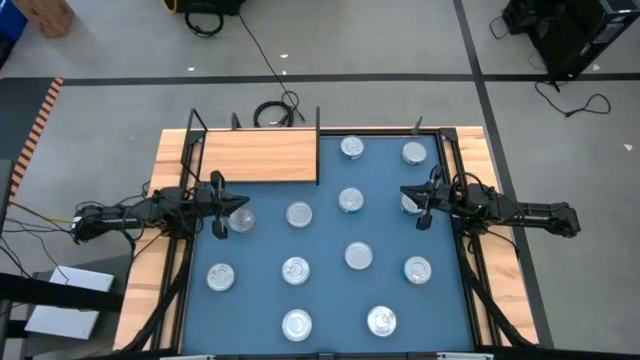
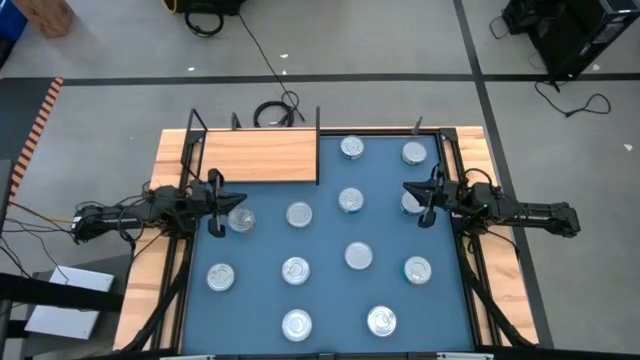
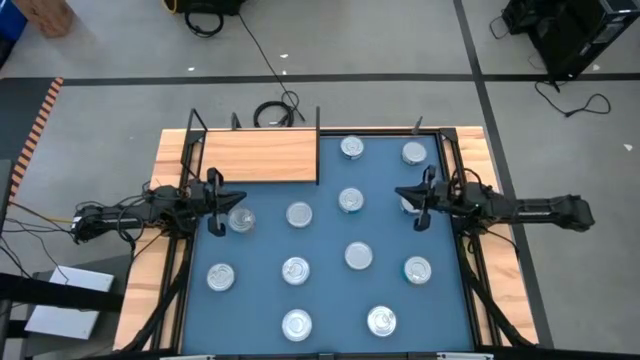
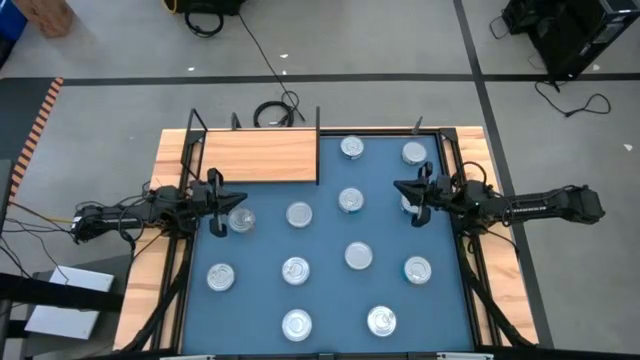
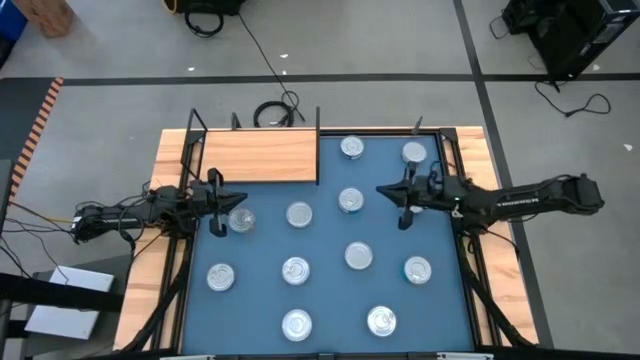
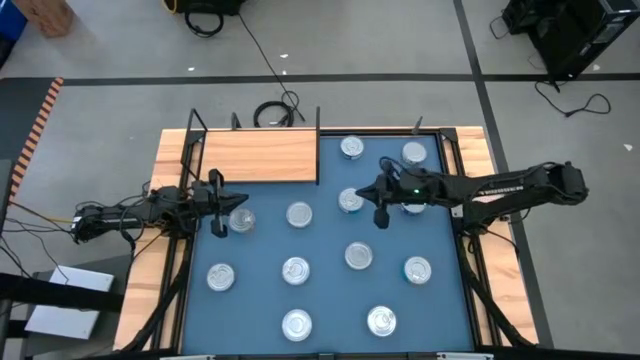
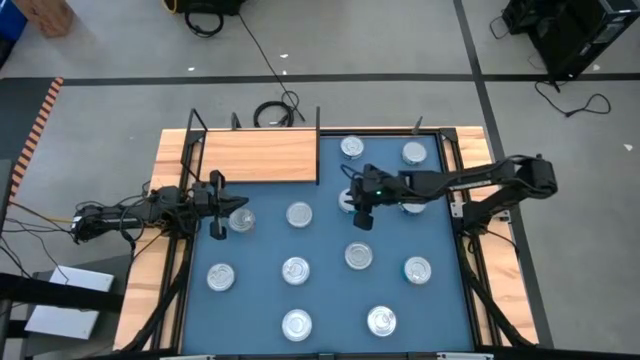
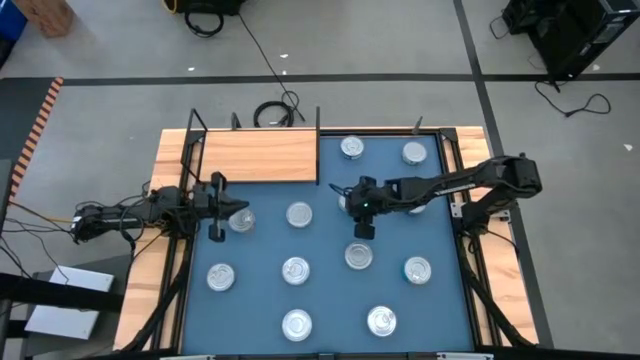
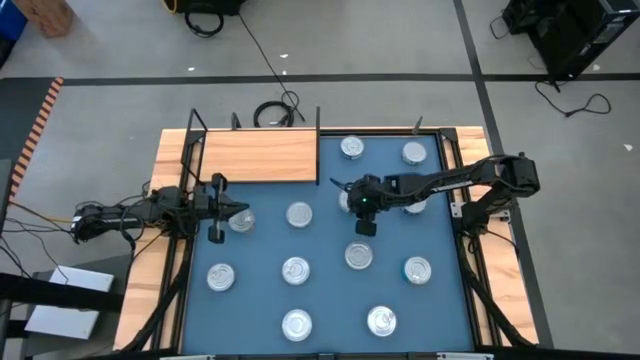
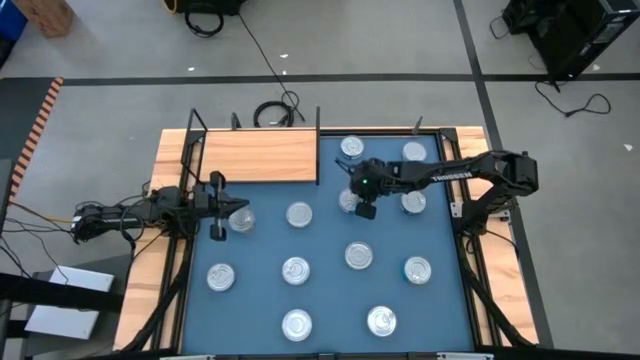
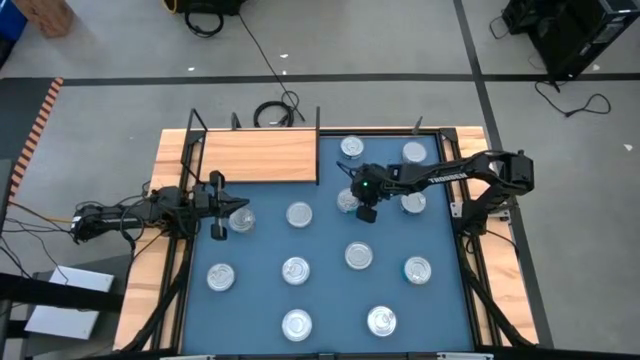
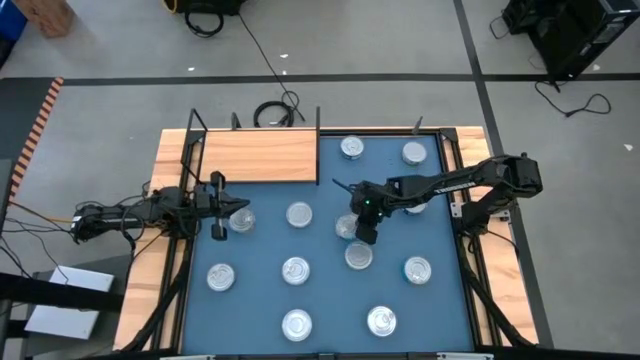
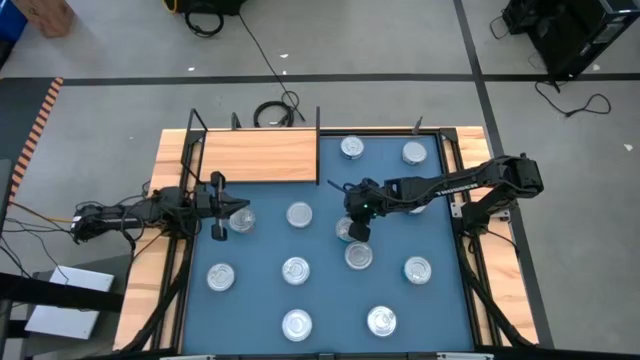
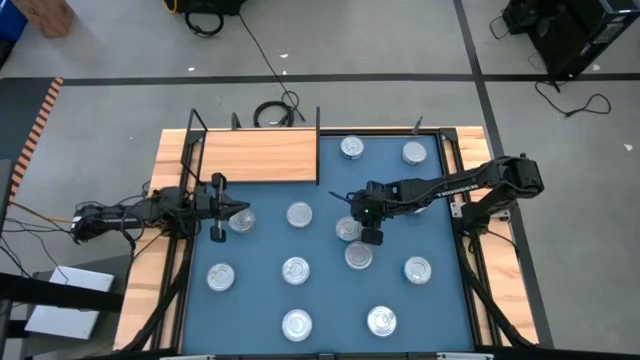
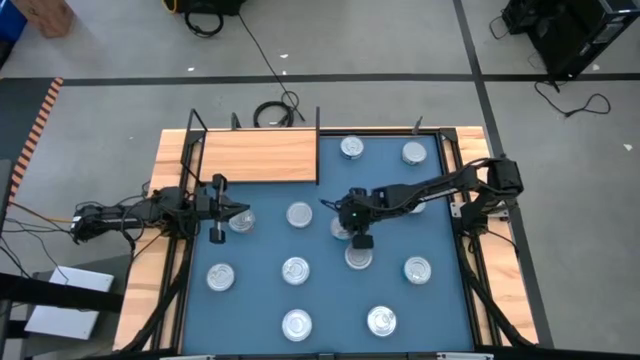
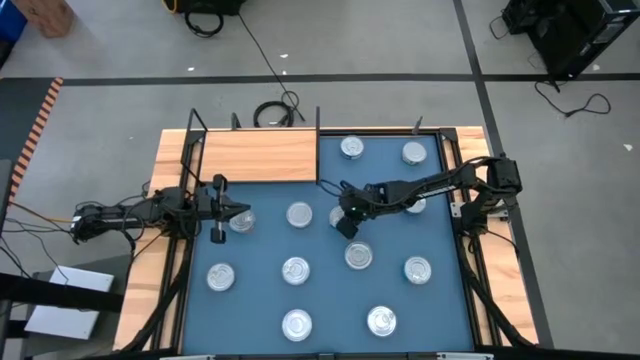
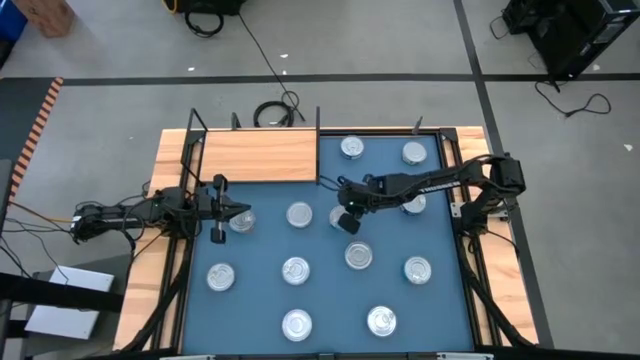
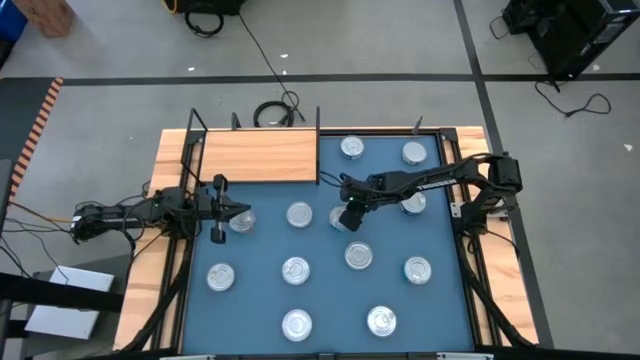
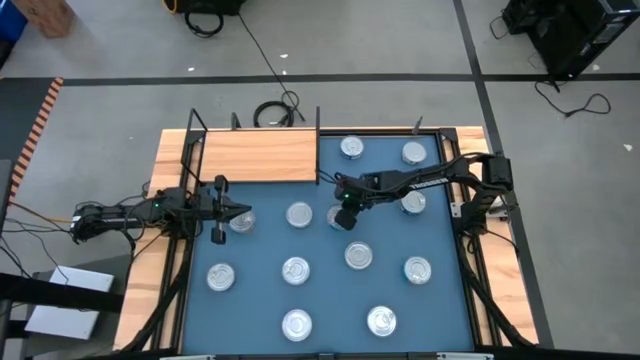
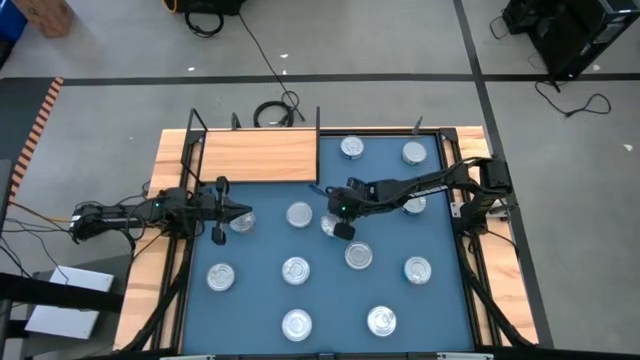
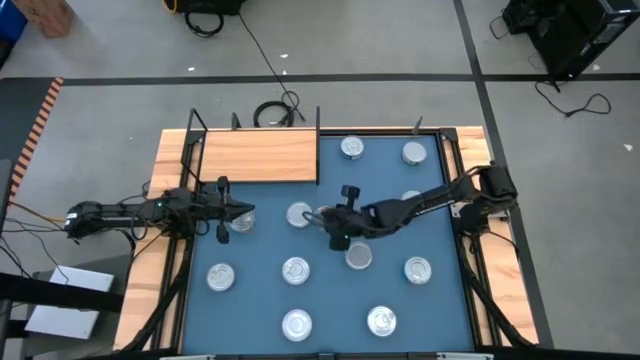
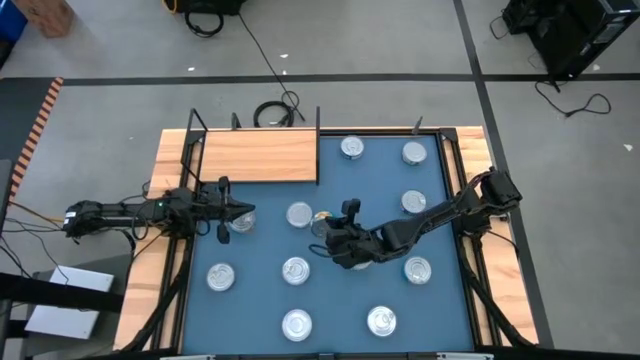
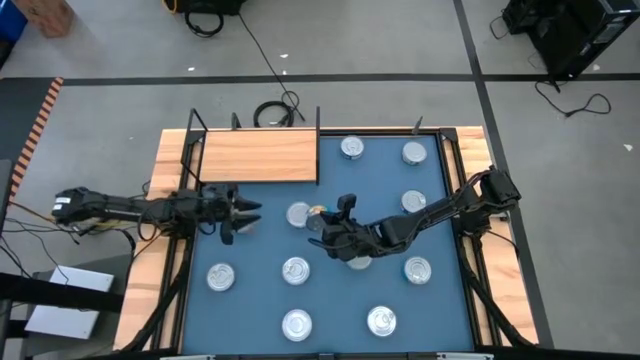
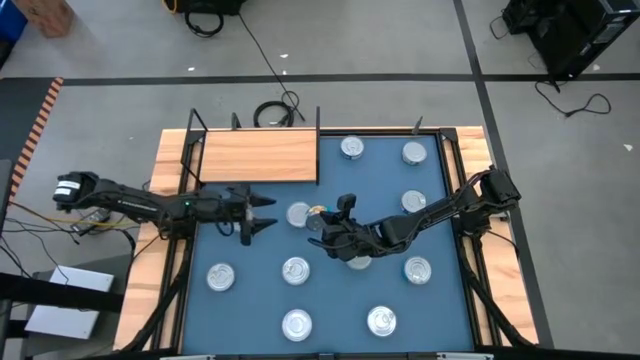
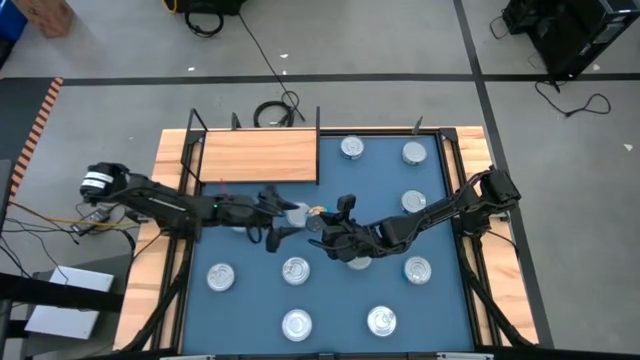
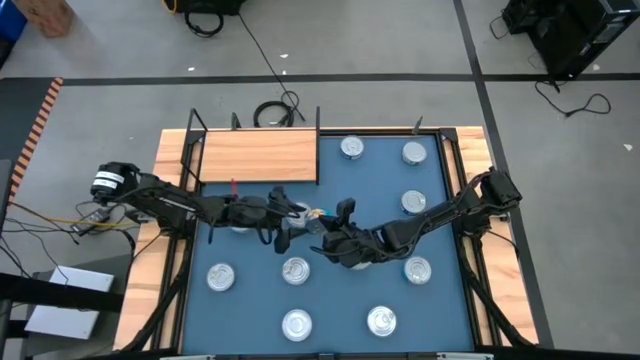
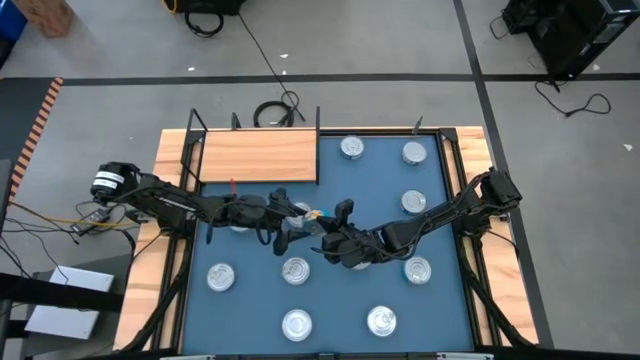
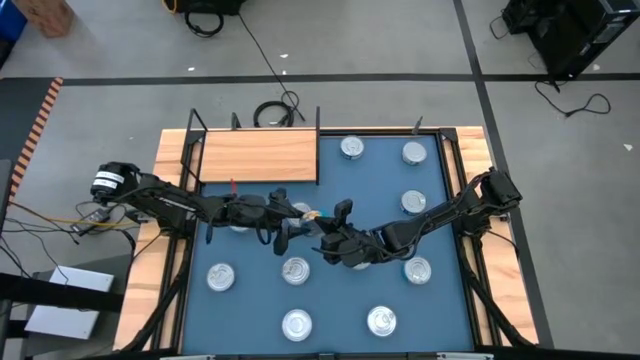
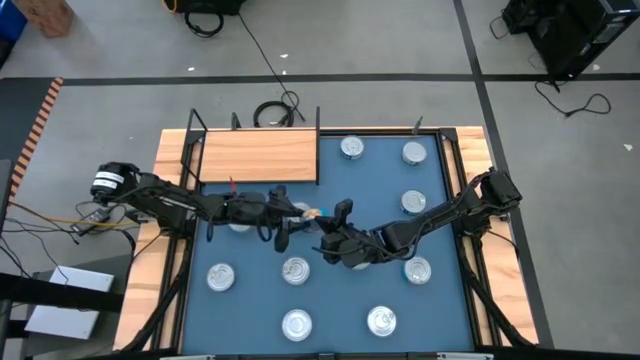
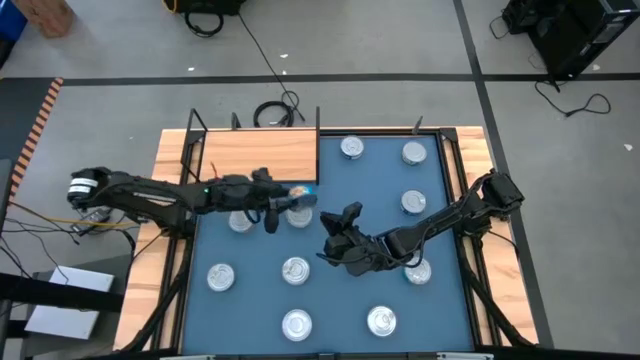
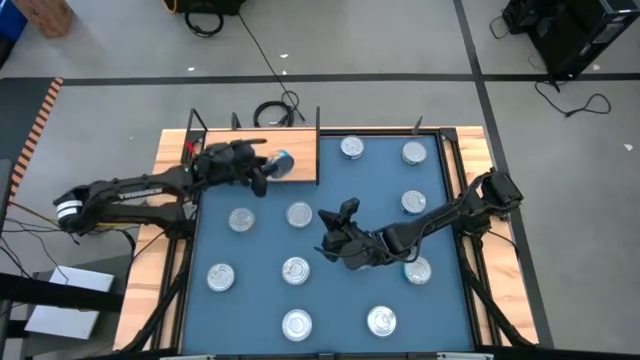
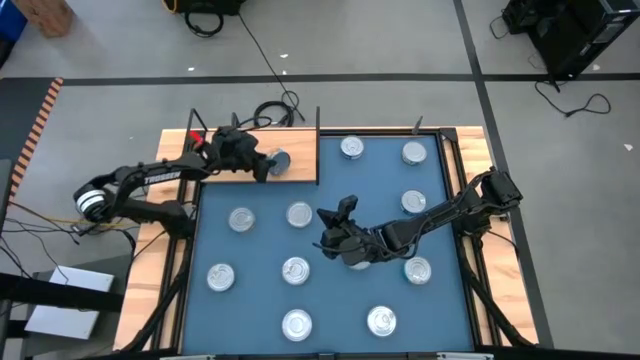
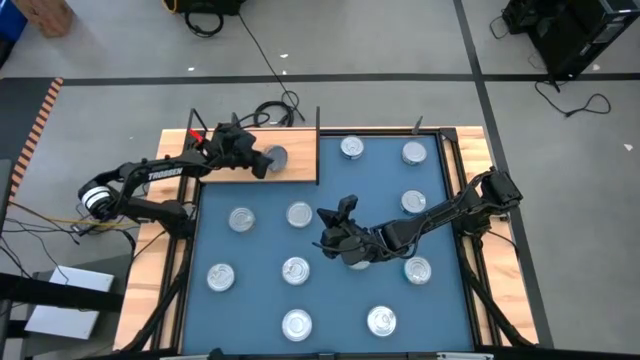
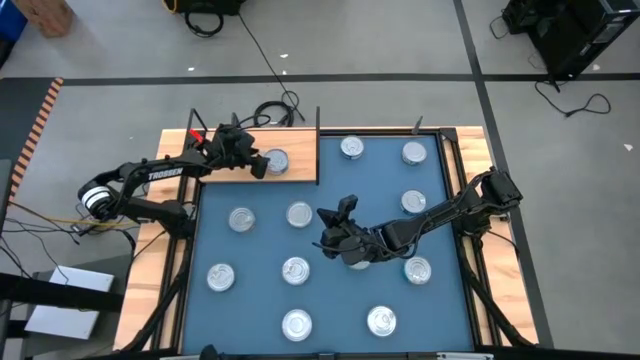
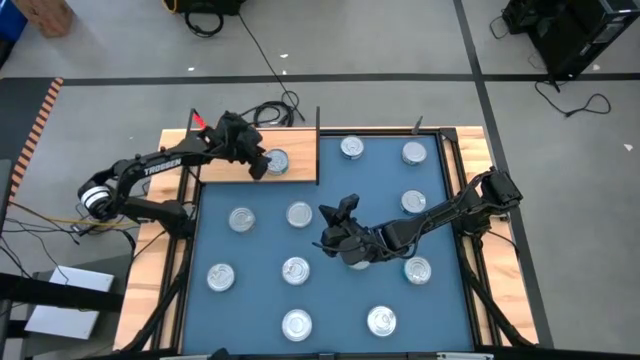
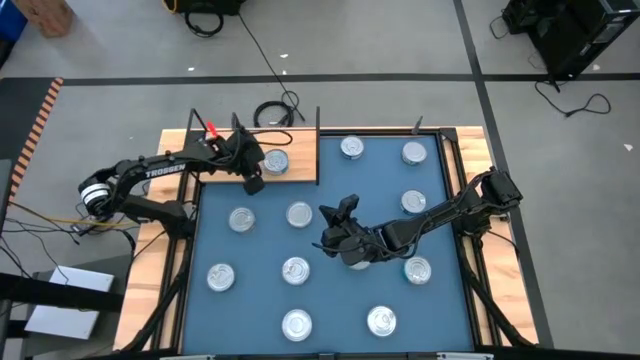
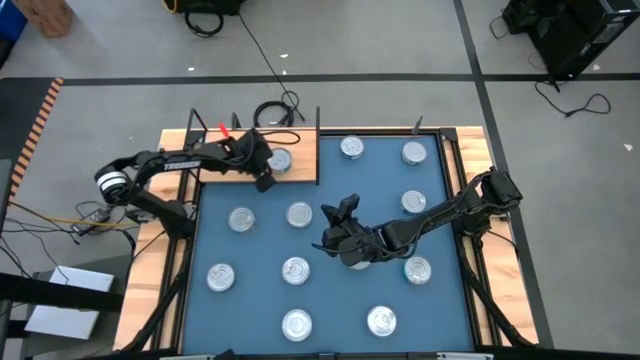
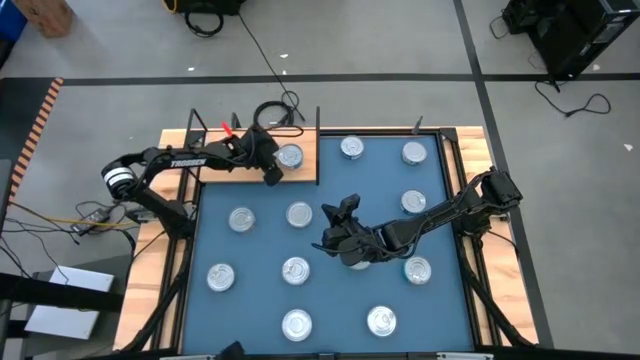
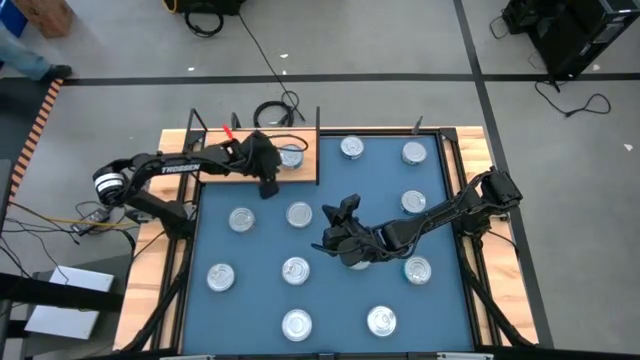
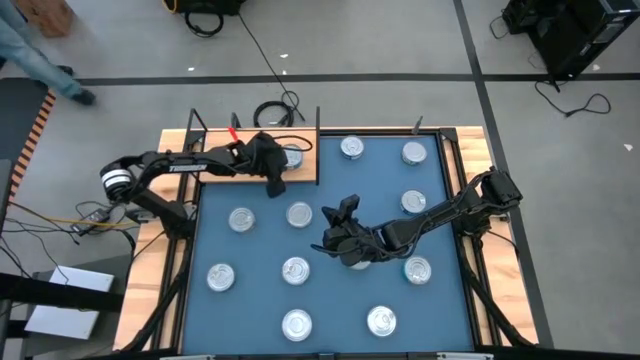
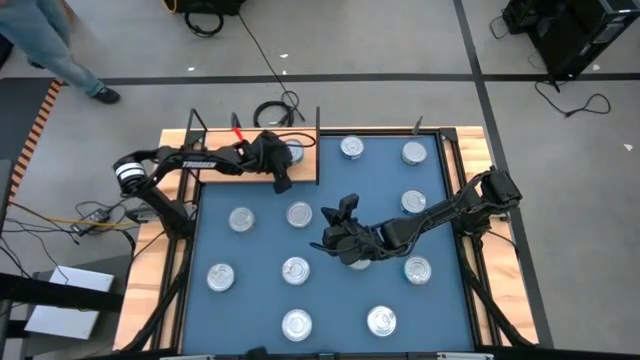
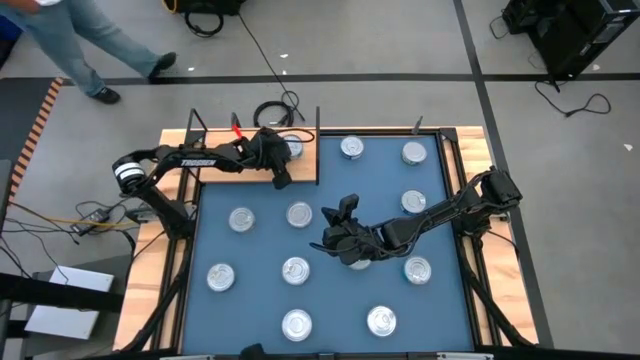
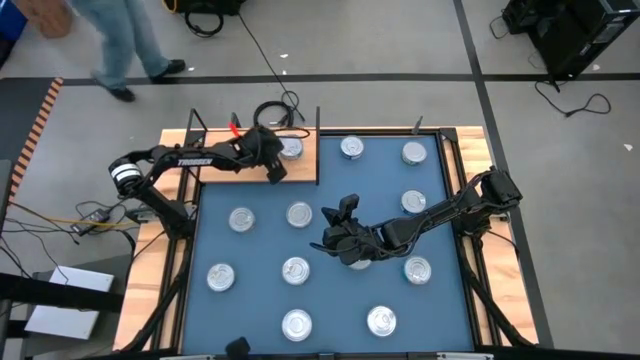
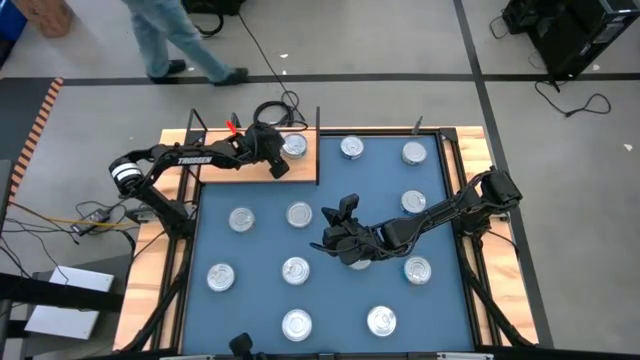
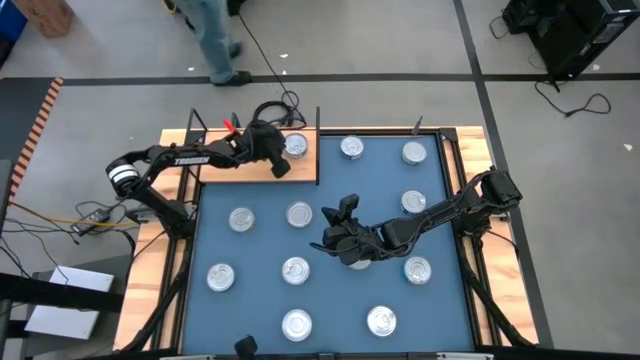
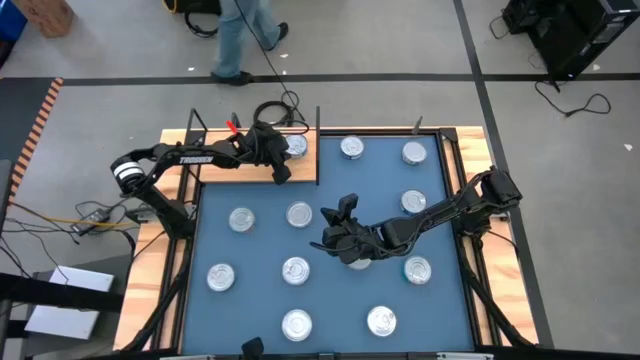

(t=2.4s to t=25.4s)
Task: Stack canned seafood by type on shelf
Put the yellow blue tuna can on the shelf
